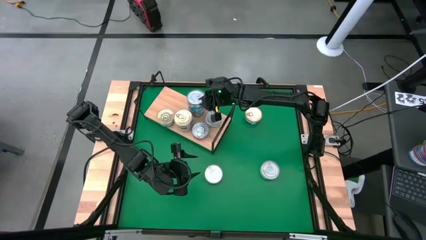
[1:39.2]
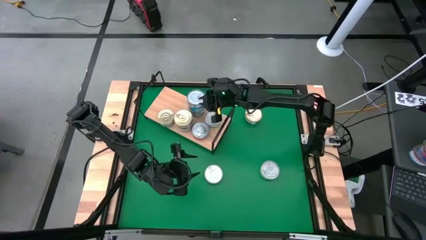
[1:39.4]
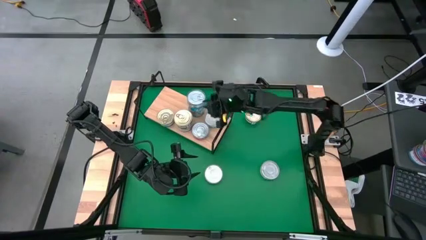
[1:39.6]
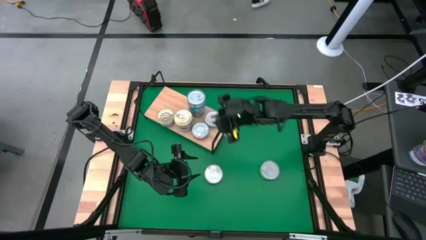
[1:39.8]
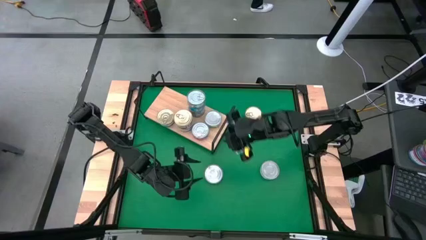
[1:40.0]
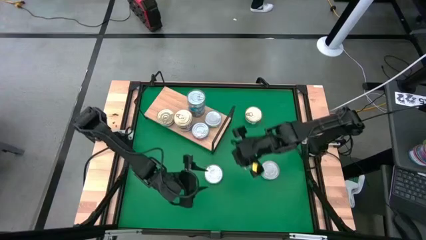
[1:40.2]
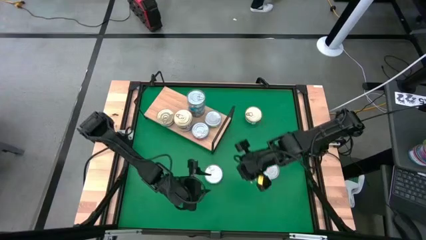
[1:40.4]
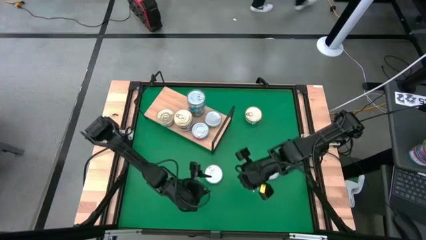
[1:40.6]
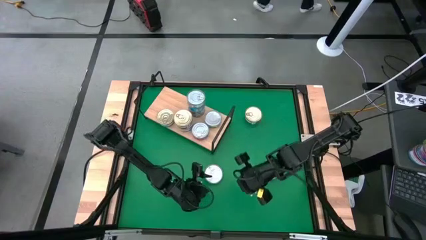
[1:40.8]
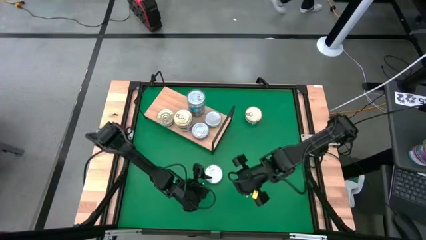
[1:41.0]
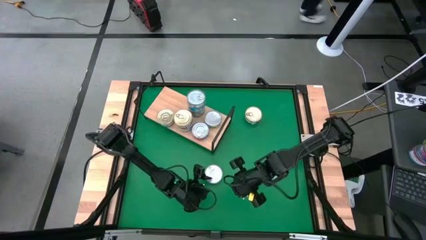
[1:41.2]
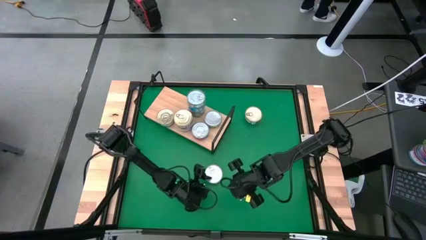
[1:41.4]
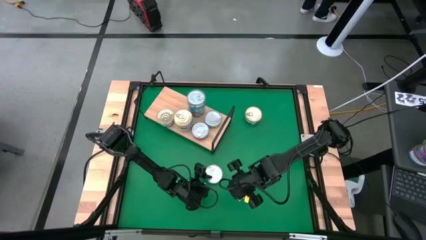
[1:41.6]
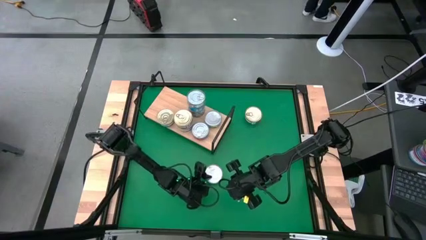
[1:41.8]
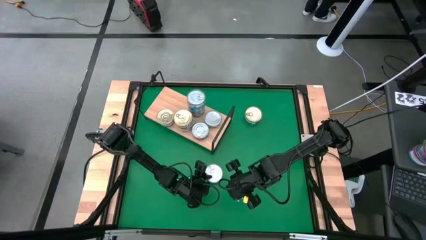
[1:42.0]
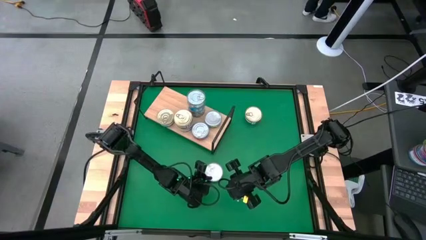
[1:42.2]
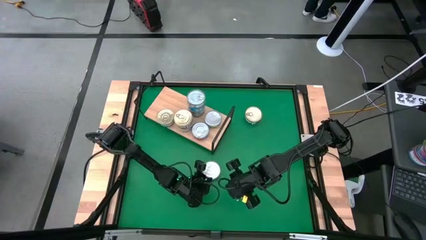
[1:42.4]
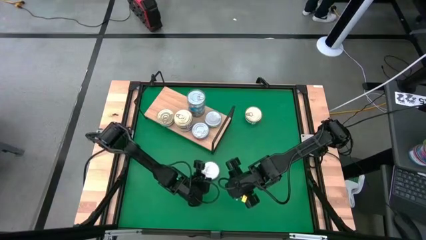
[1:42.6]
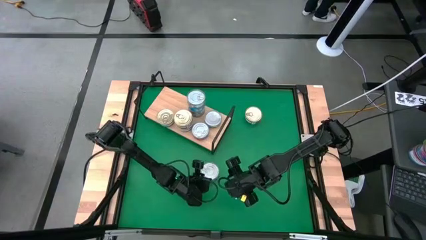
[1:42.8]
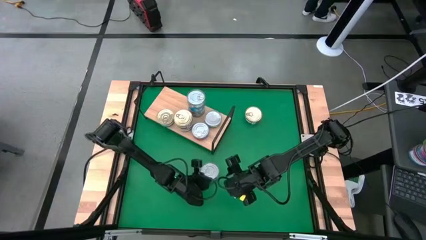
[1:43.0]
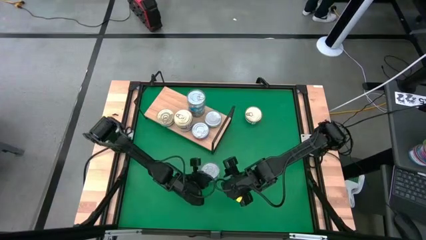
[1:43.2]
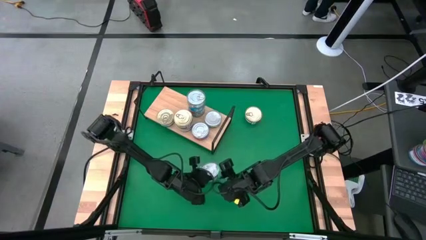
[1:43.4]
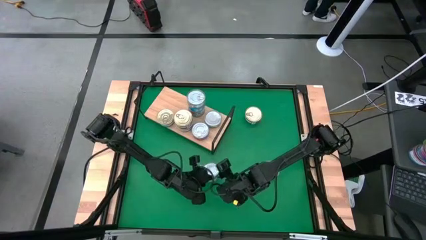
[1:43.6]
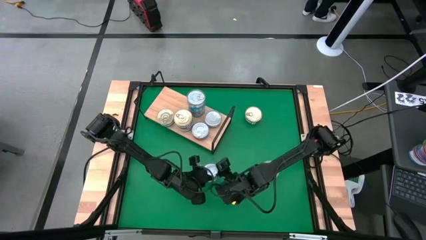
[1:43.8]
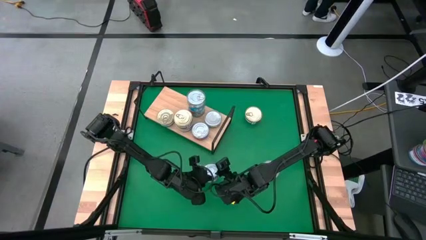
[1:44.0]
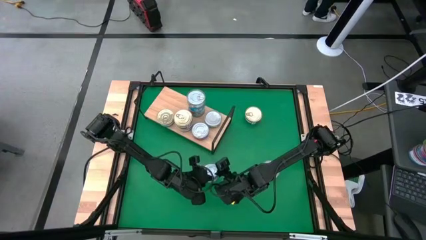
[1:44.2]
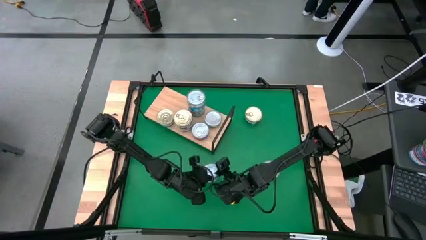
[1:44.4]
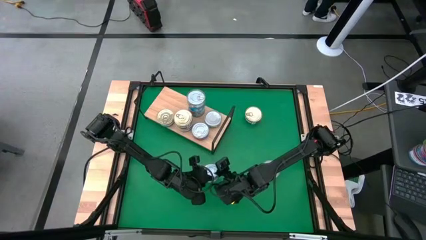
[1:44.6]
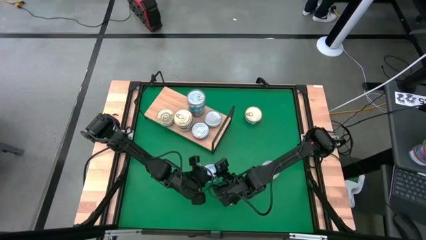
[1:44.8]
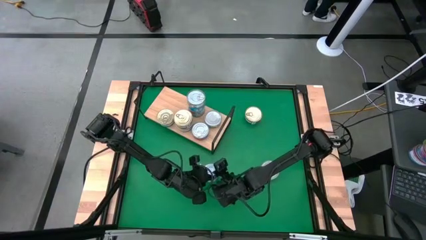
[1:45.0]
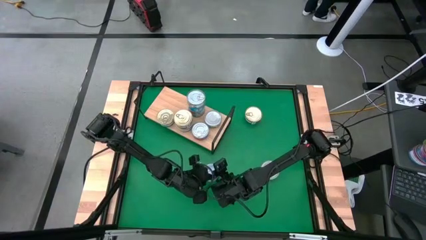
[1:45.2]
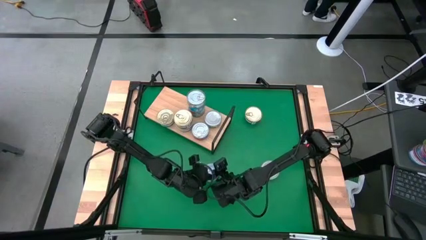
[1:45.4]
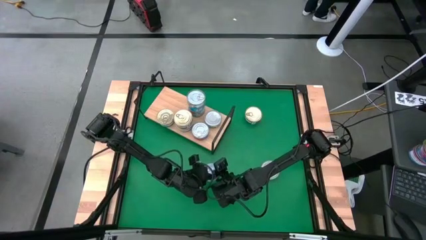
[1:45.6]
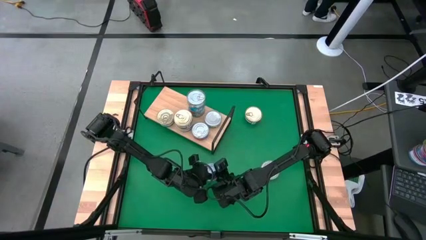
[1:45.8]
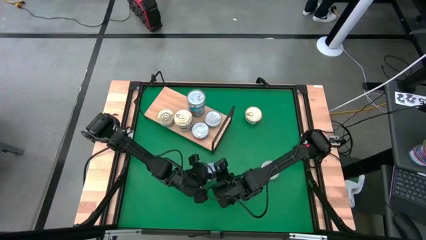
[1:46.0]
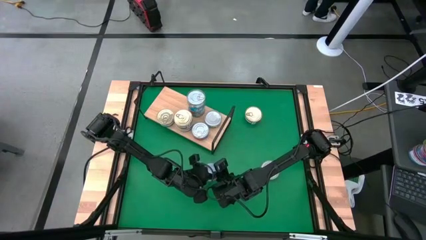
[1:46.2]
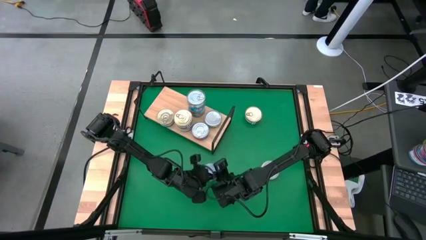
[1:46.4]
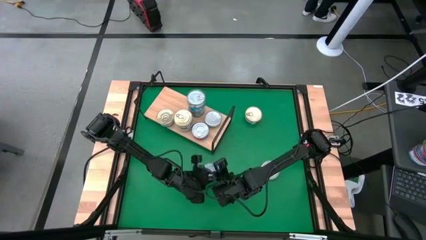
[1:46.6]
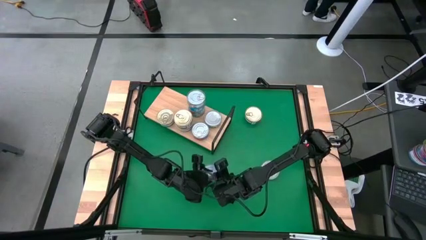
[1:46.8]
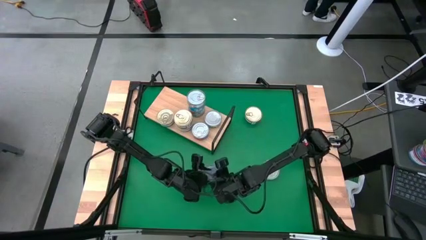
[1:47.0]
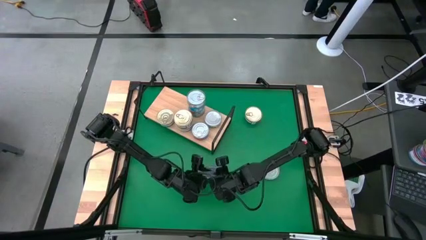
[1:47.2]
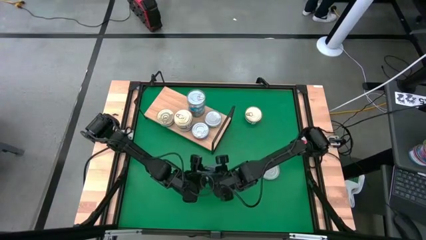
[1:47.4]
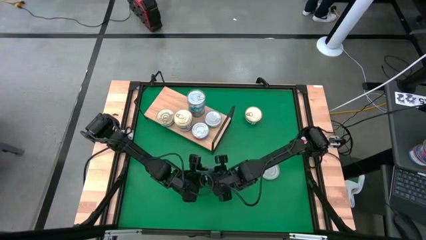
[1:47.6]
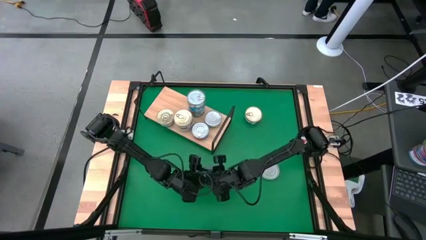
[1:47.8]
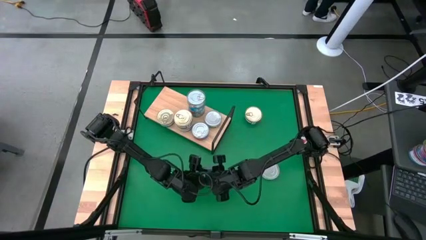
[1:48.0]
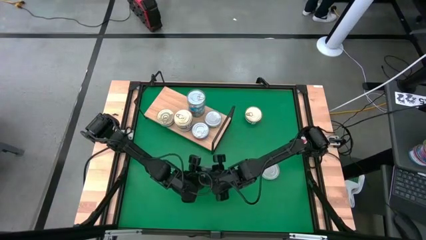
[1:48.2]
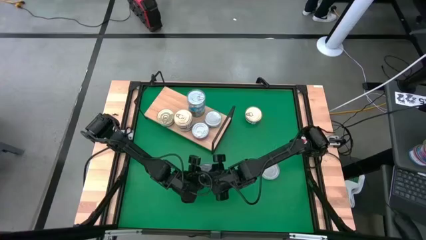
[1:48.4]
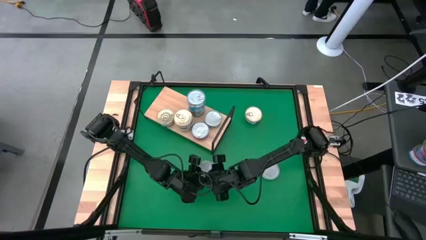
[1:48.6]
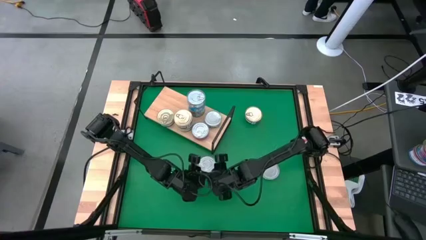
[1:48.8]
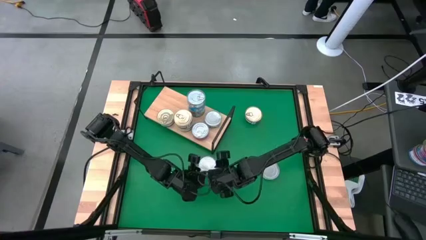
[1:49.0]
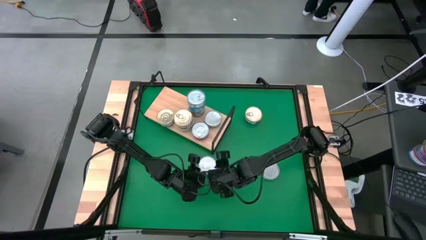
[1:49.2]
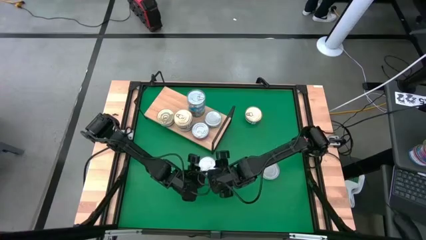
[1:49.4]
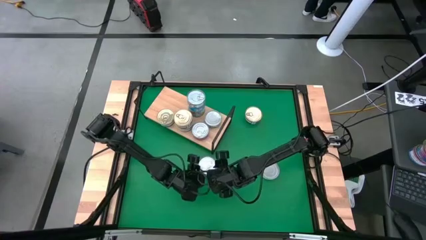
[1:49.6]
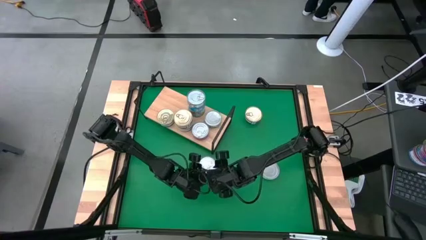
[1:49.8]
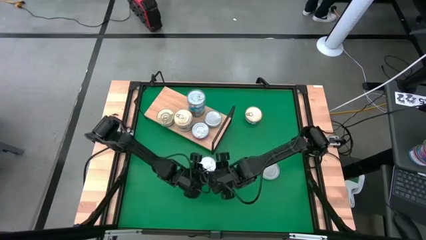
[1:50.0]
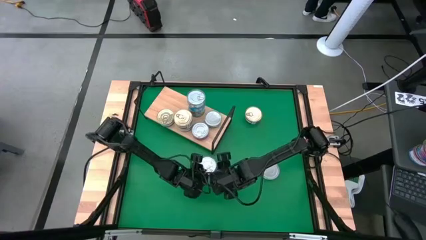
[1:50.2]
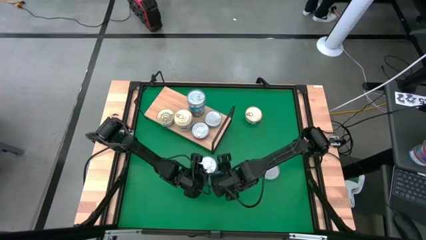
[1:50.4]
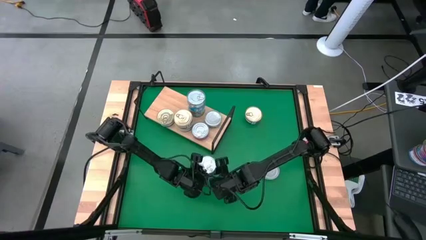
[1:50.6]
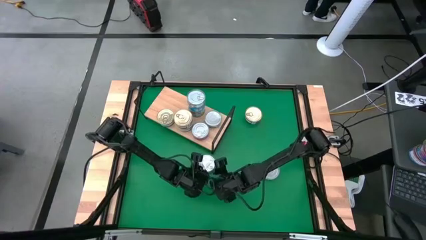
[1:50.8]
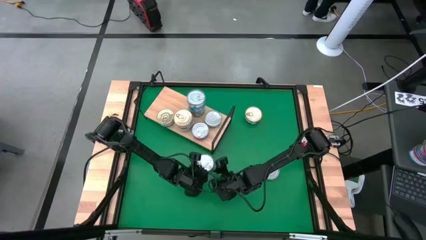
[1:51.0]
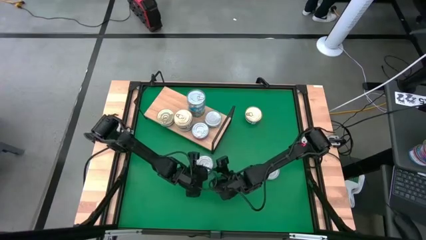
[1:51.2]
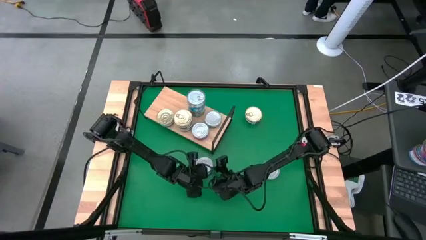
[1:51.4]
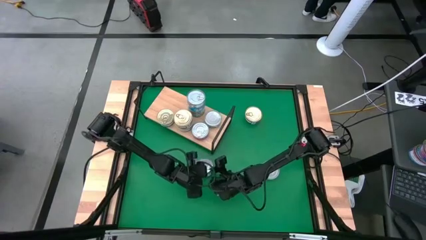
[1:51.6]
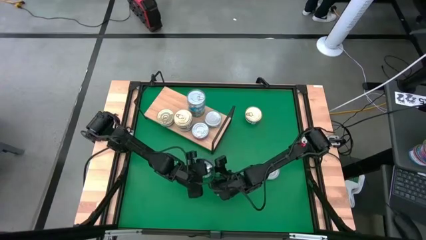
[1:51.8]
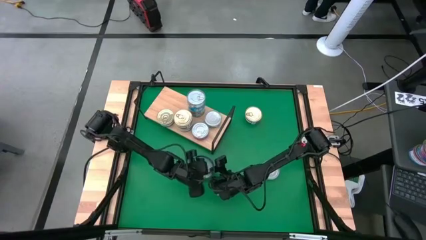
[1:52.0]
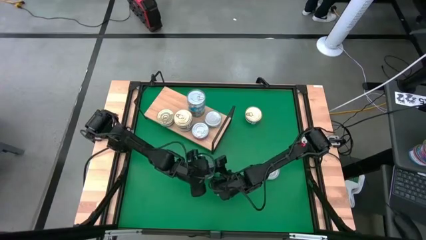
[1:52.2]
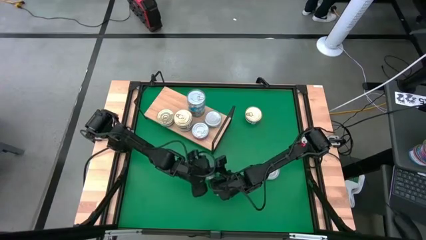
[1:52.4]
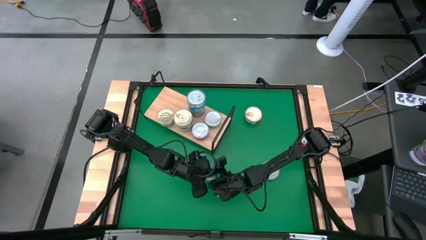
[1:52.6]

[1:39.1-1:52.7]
Task: Stack canned seafood by type on shelf
Put the green tuna can on the shelf
